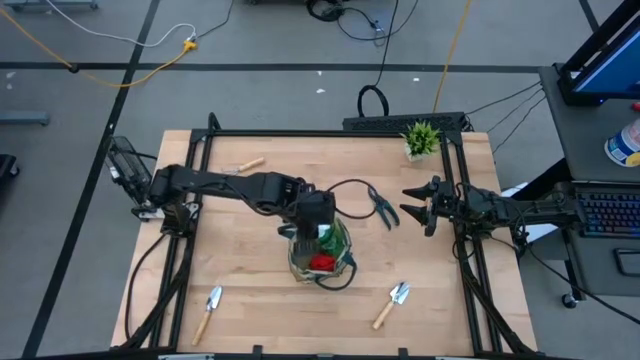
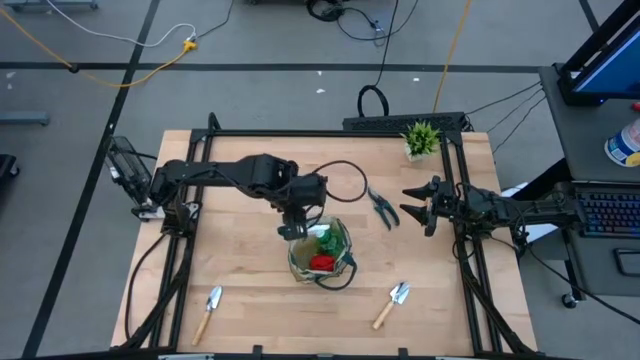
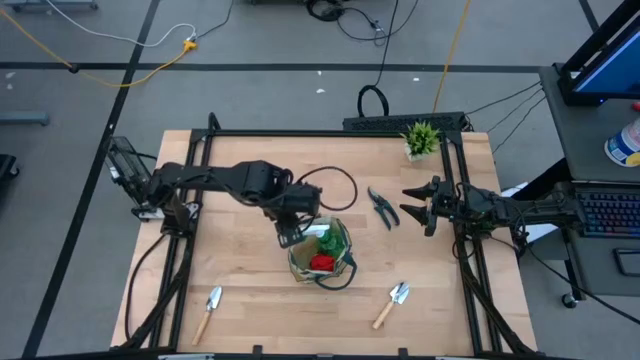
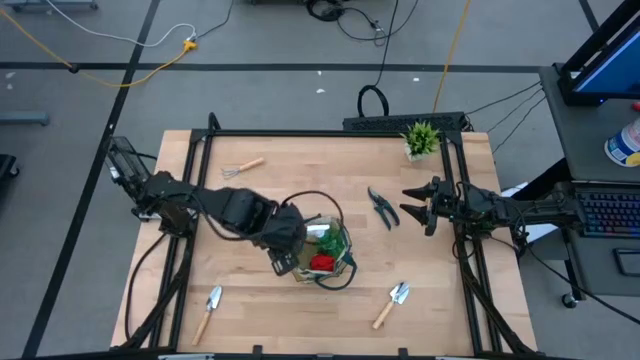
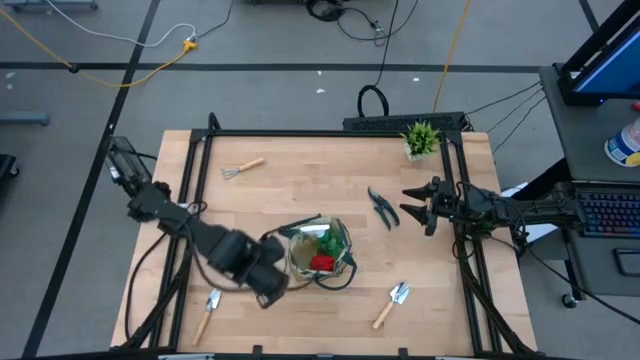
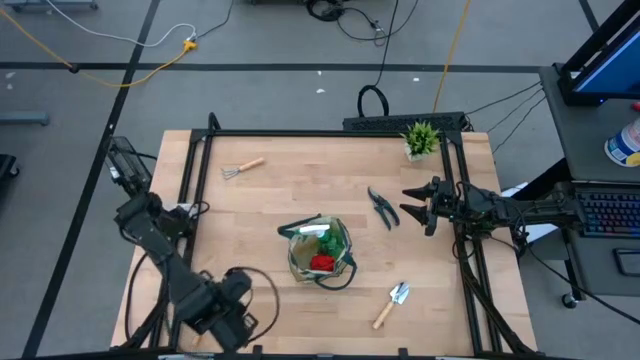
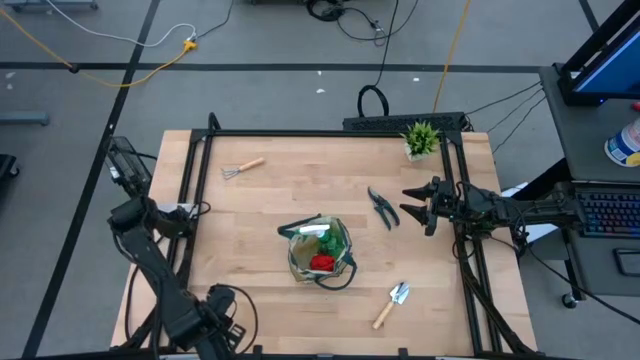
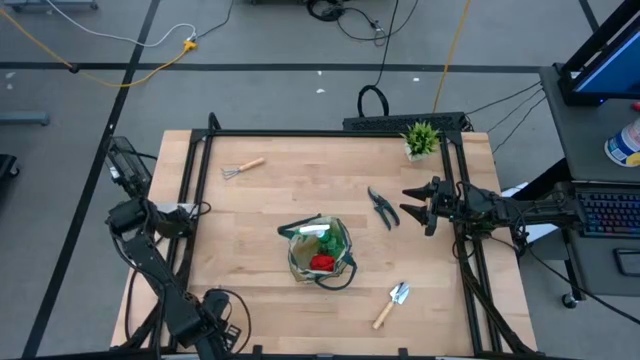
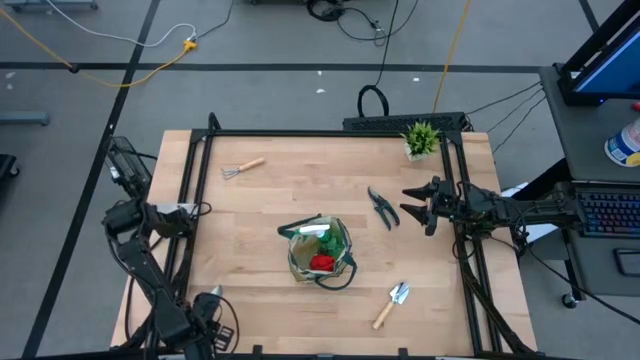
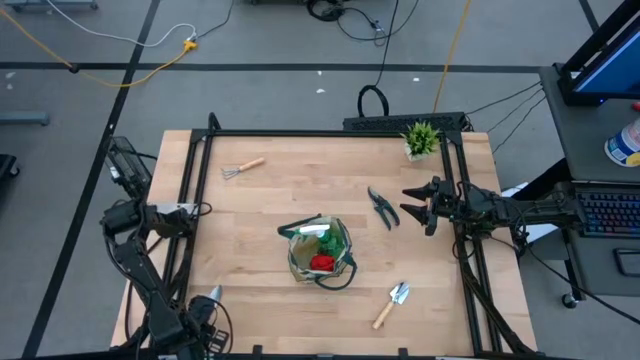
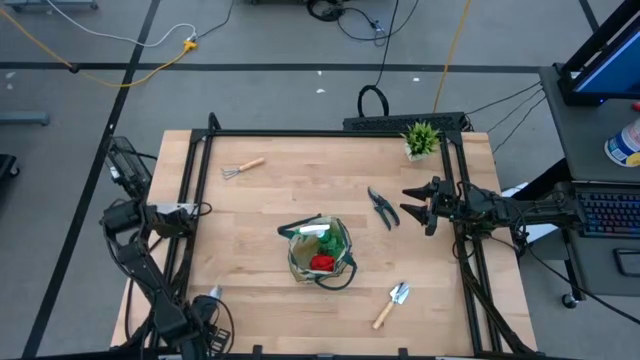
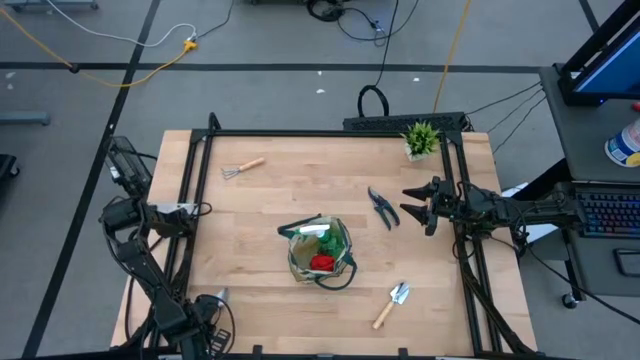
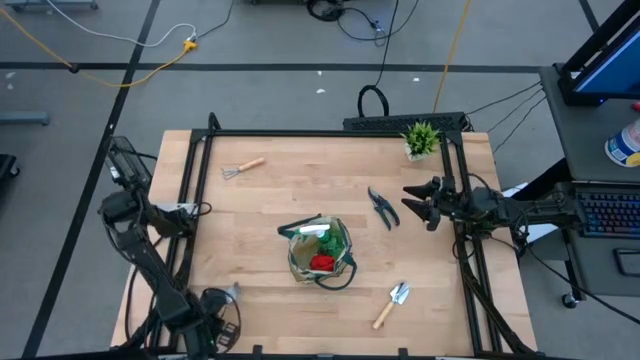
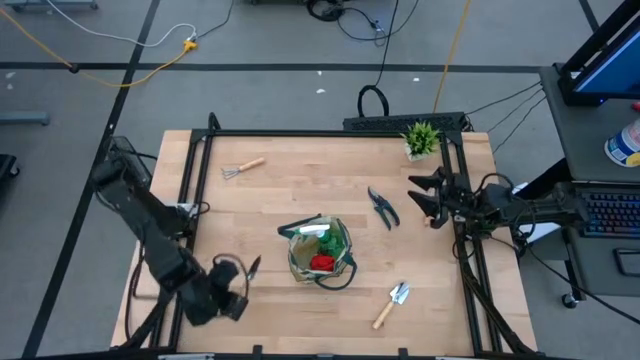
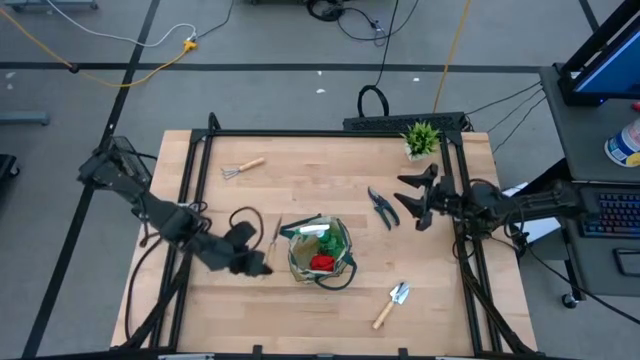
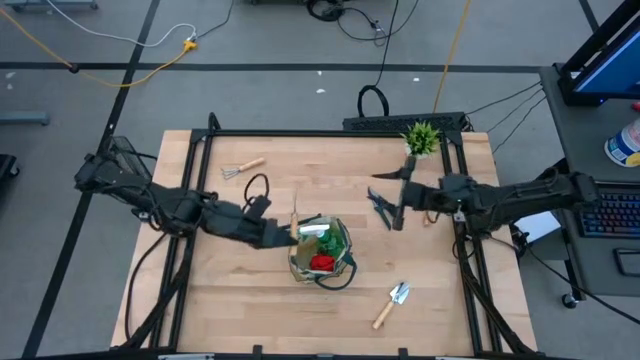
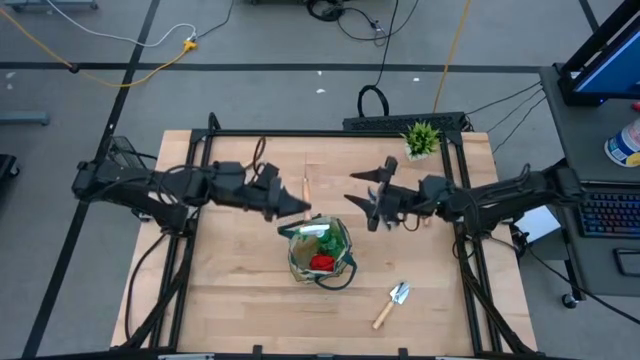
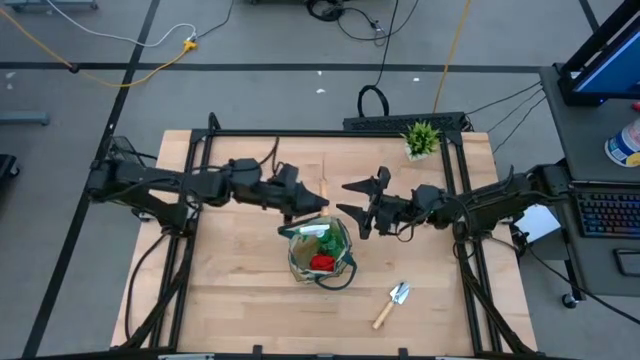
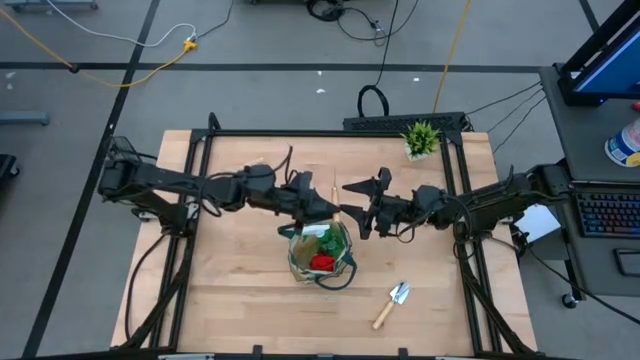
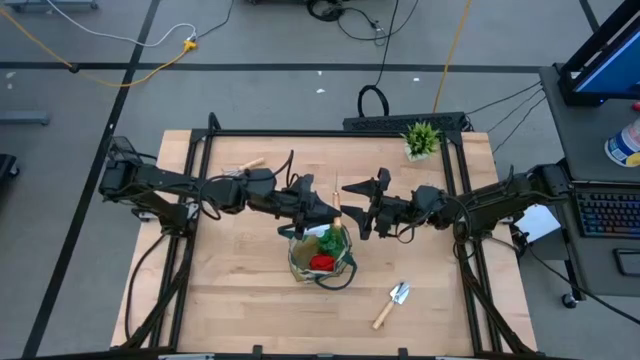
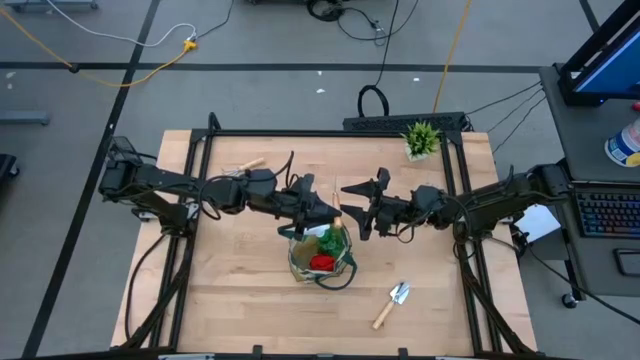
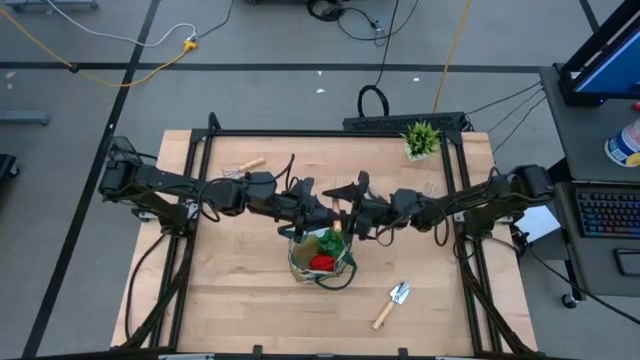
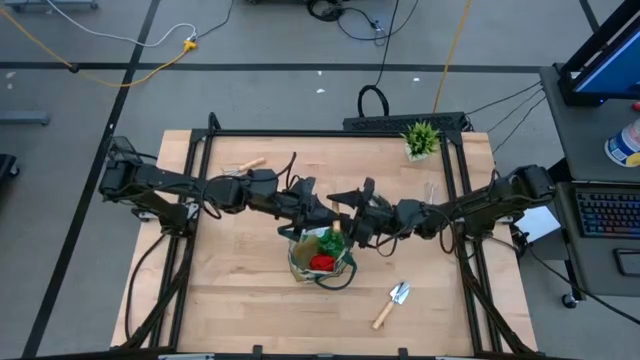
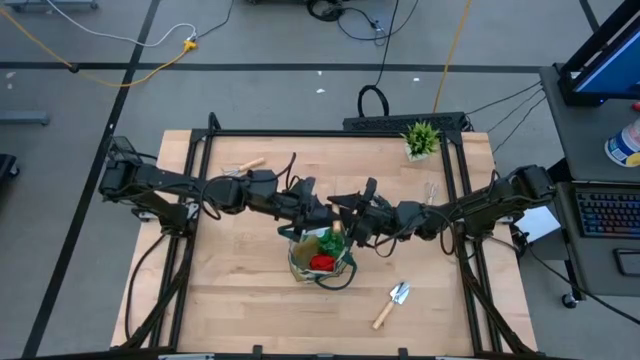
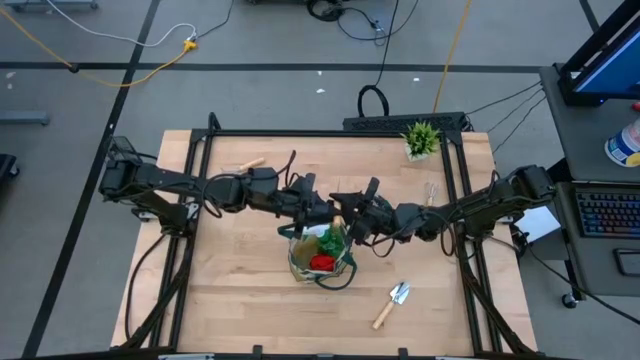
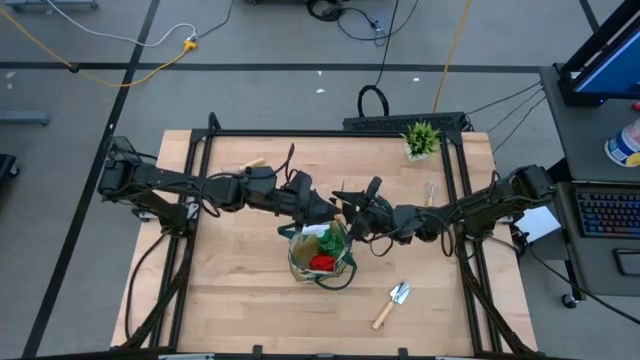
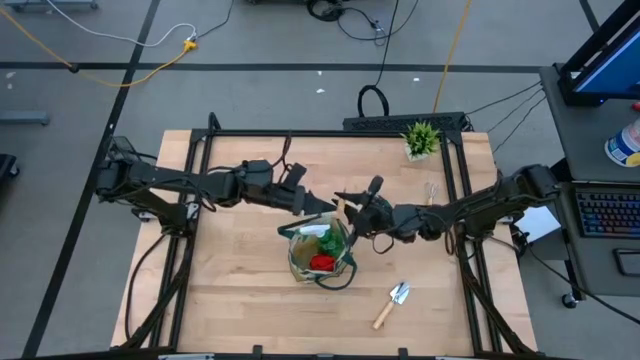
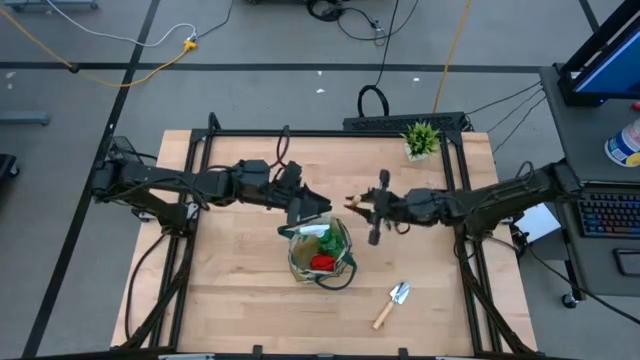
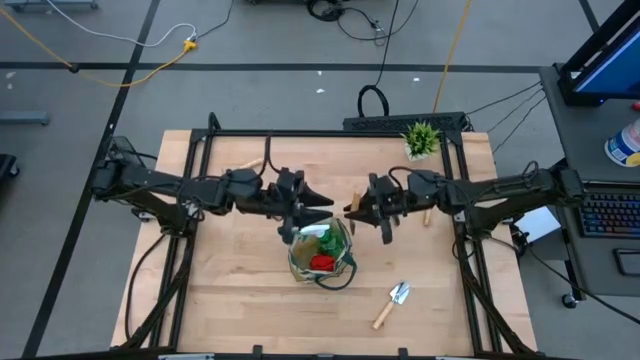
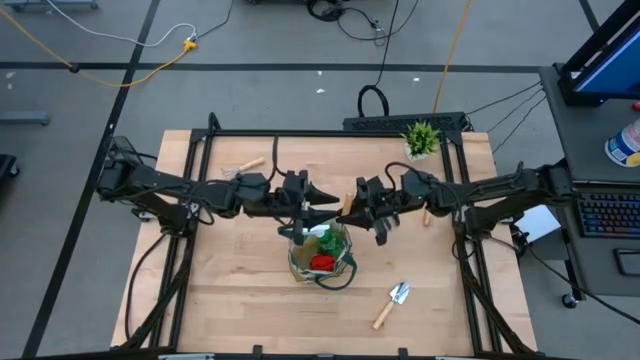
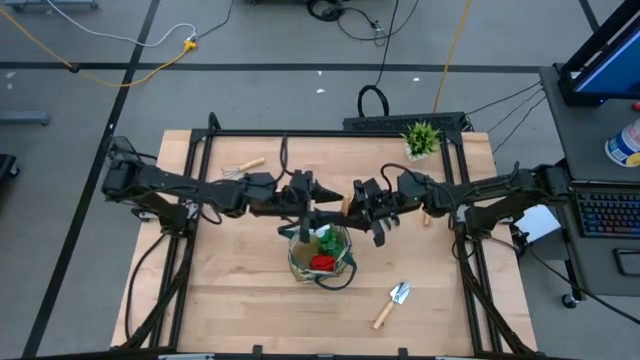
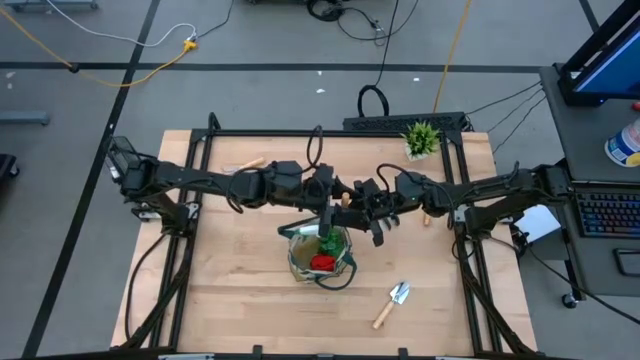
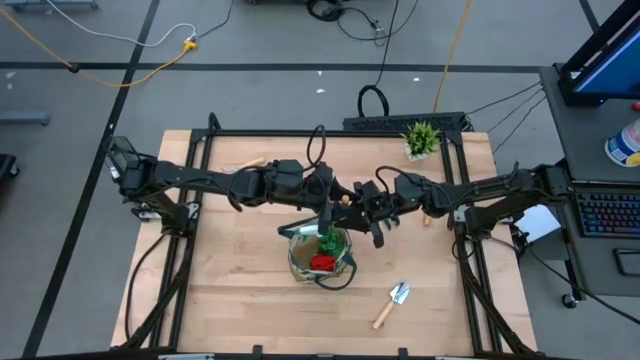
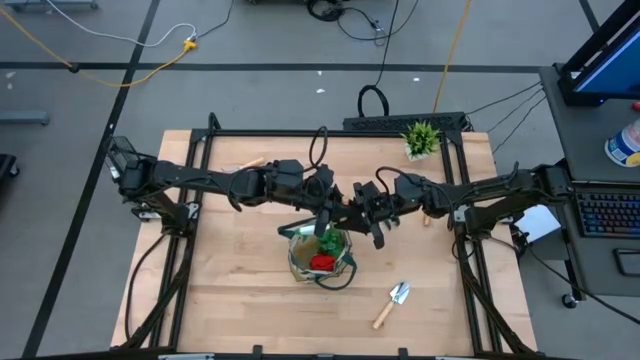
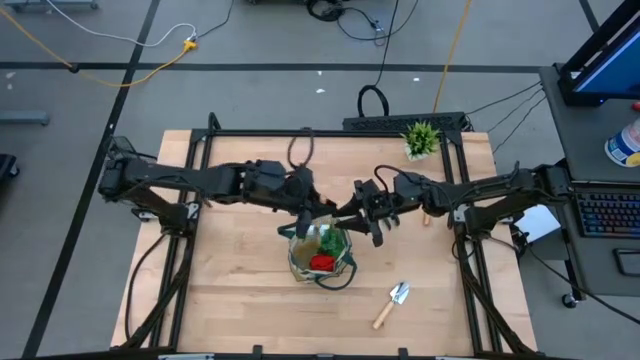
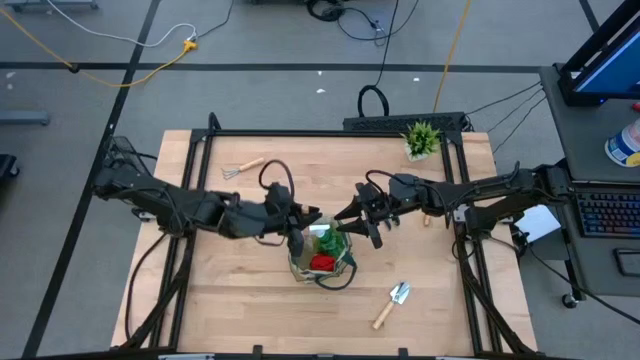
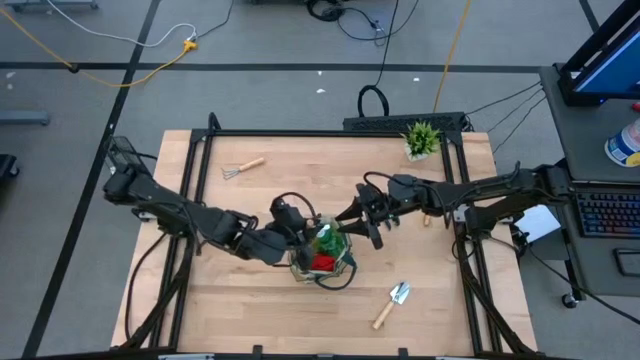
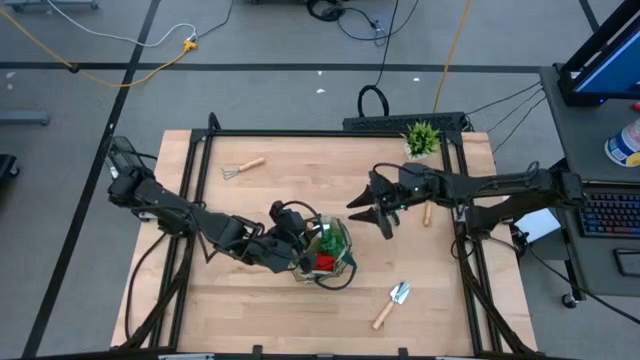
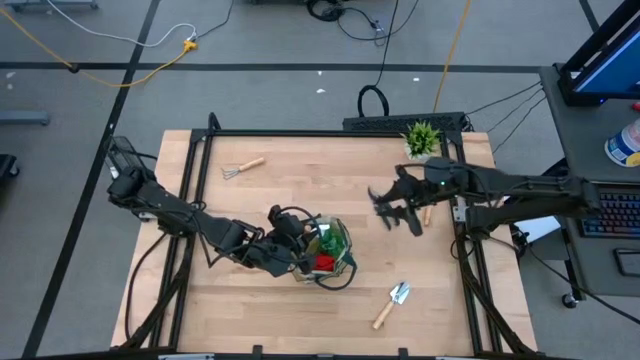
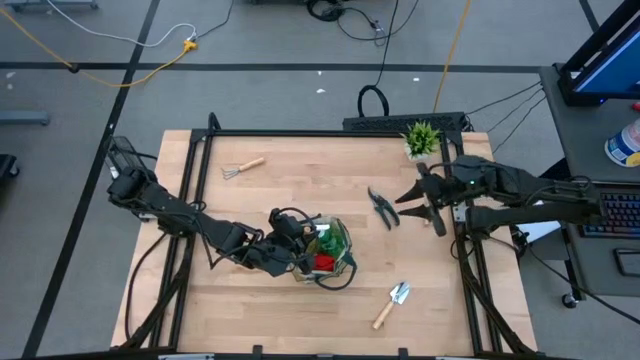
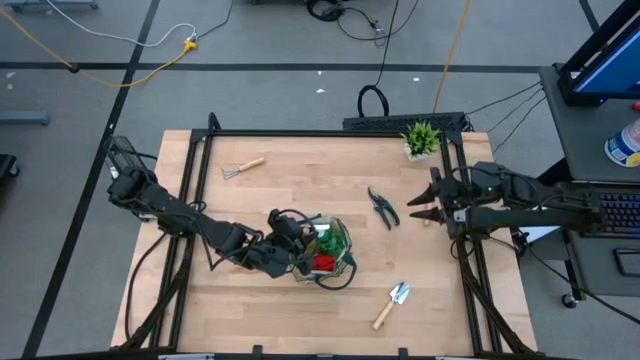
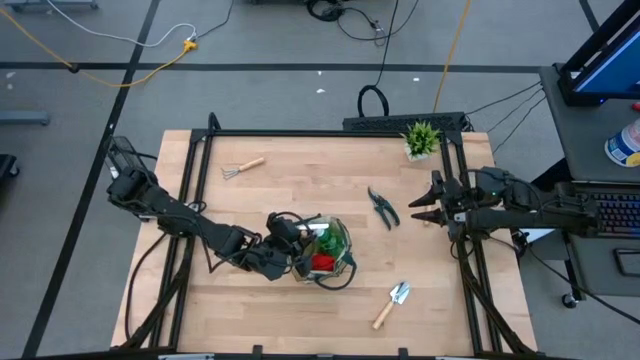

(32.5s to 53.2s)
Task: Pick & Place Garden tools in Gardening bag
Put the left brown trowel into the gardening bag
